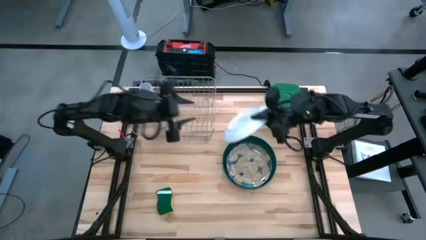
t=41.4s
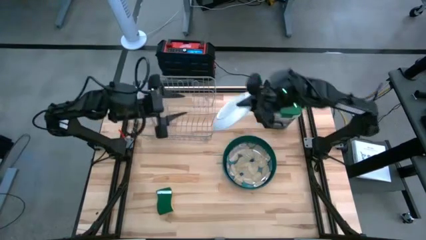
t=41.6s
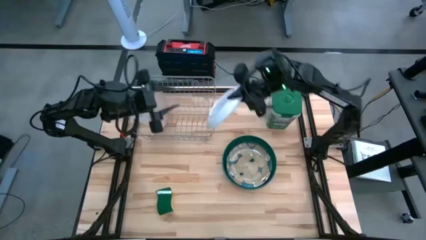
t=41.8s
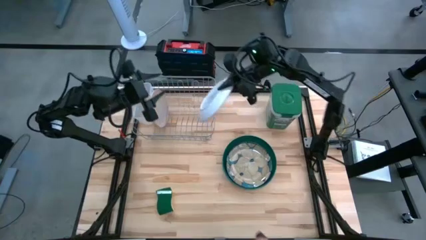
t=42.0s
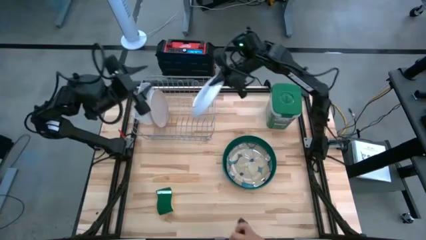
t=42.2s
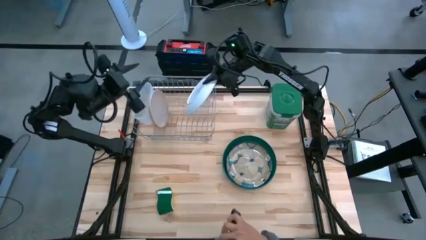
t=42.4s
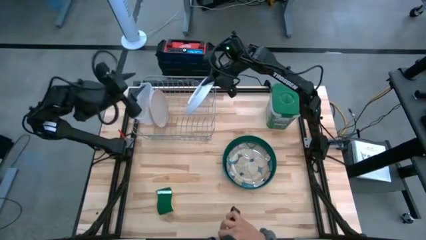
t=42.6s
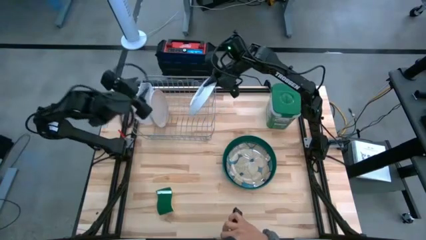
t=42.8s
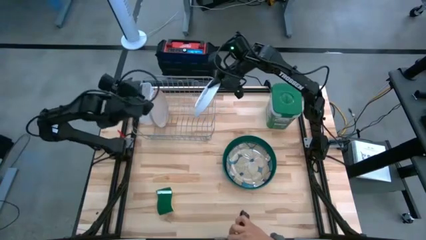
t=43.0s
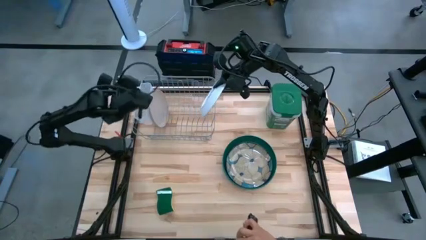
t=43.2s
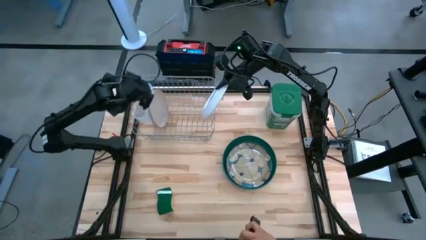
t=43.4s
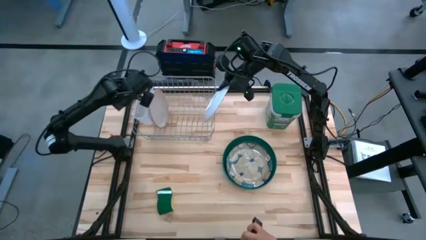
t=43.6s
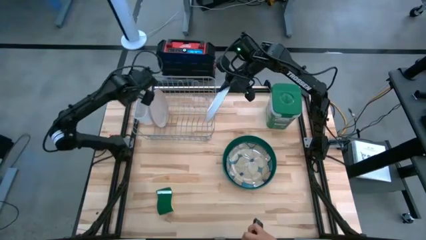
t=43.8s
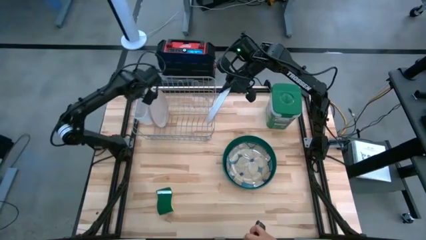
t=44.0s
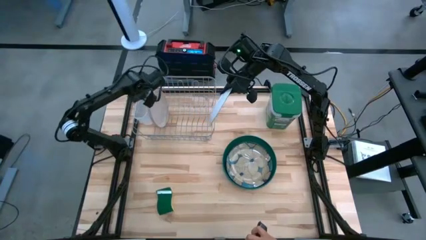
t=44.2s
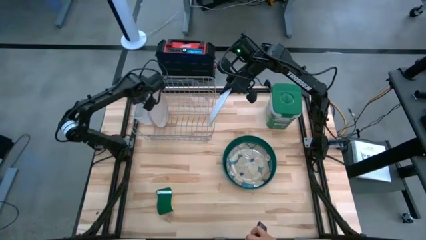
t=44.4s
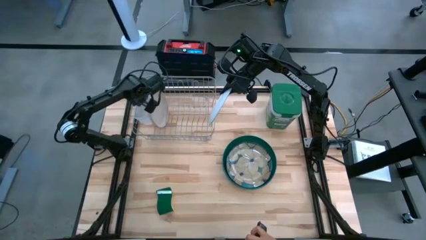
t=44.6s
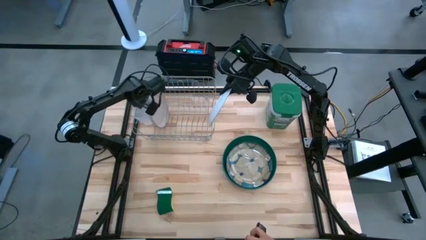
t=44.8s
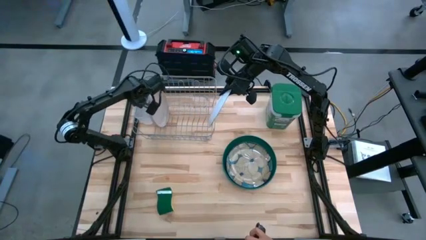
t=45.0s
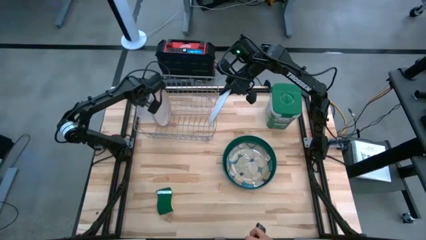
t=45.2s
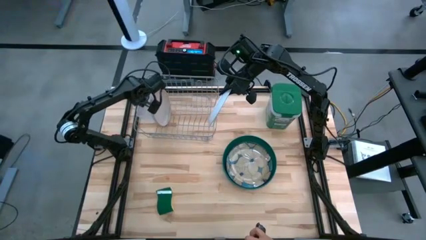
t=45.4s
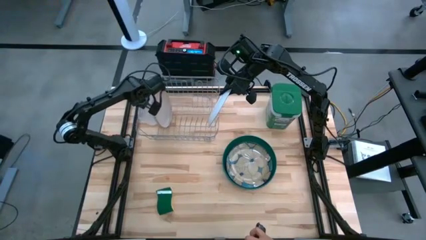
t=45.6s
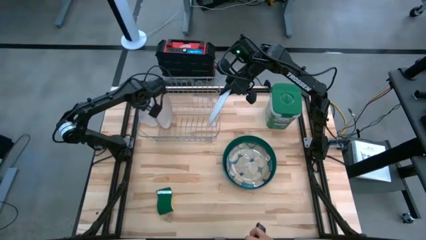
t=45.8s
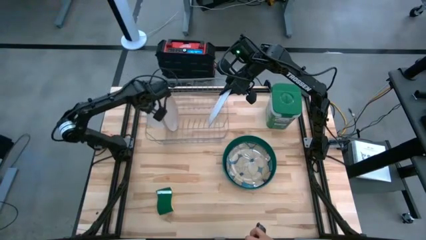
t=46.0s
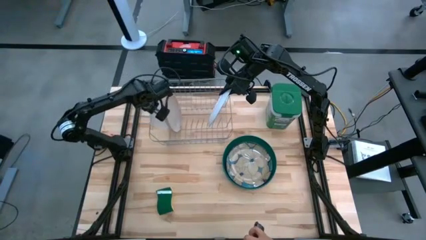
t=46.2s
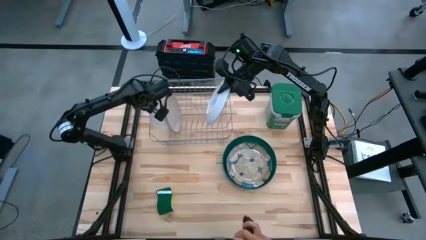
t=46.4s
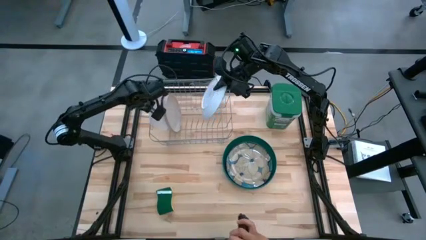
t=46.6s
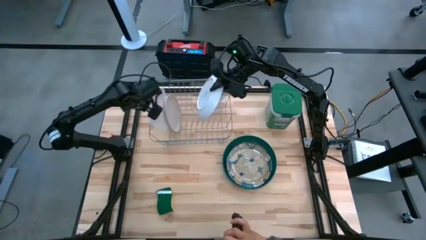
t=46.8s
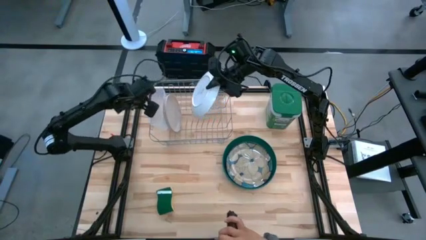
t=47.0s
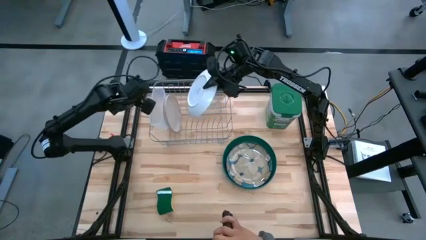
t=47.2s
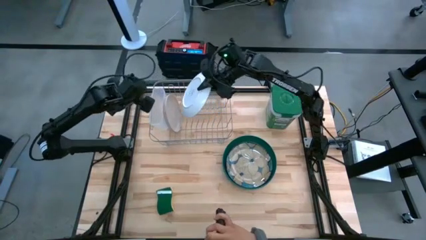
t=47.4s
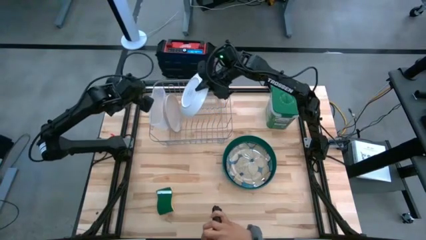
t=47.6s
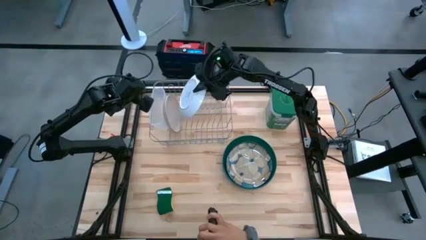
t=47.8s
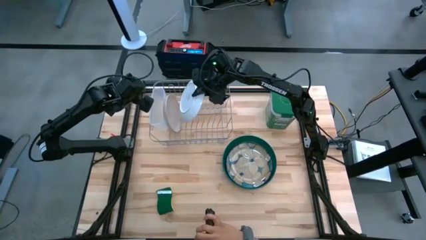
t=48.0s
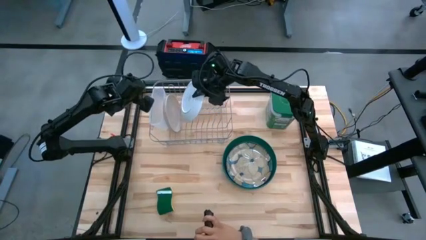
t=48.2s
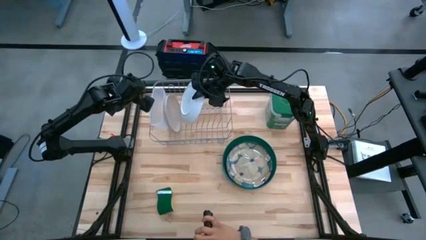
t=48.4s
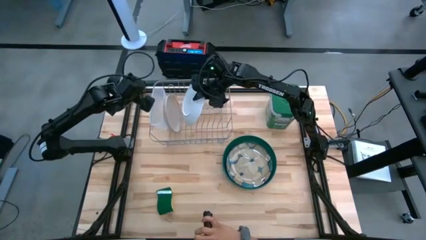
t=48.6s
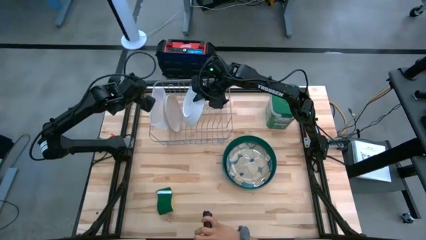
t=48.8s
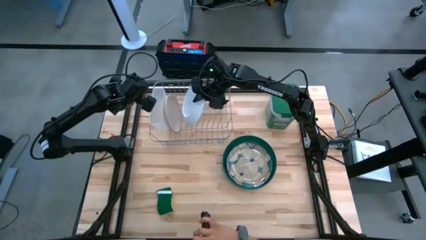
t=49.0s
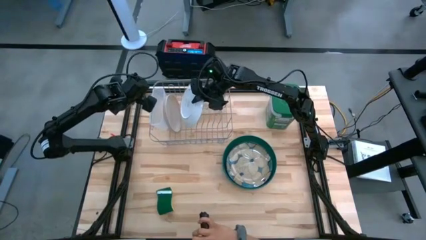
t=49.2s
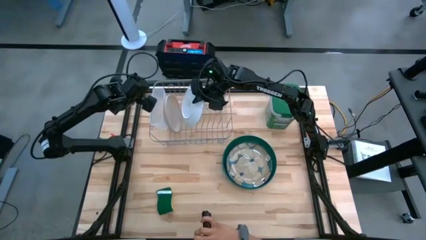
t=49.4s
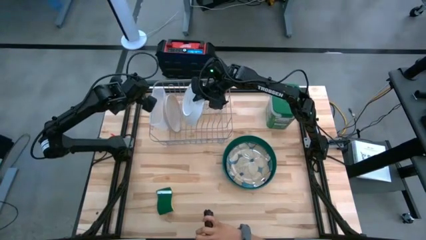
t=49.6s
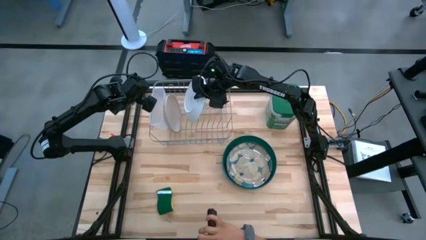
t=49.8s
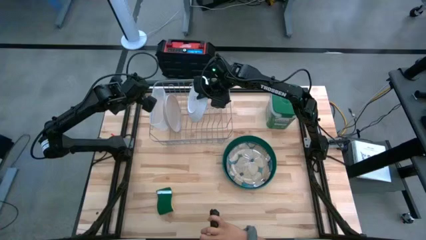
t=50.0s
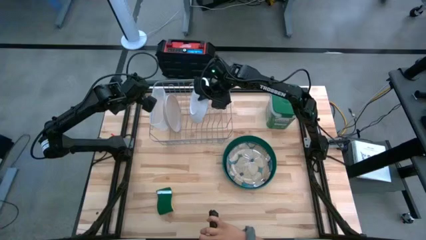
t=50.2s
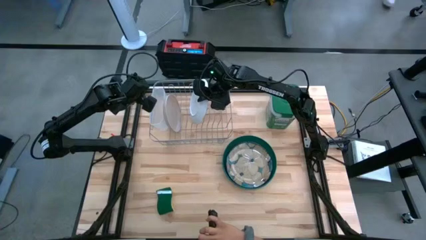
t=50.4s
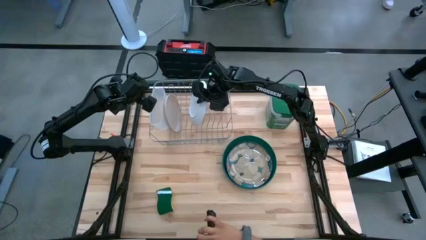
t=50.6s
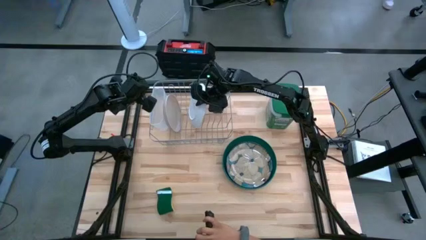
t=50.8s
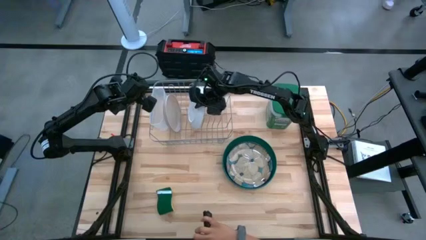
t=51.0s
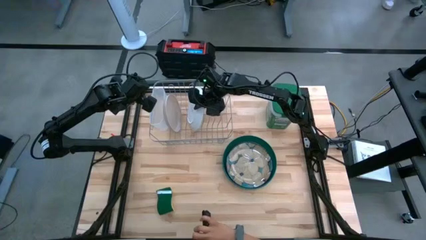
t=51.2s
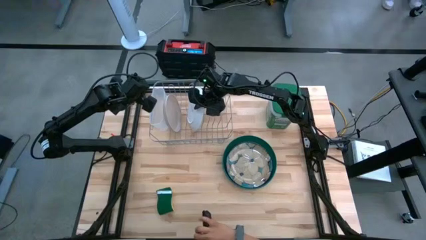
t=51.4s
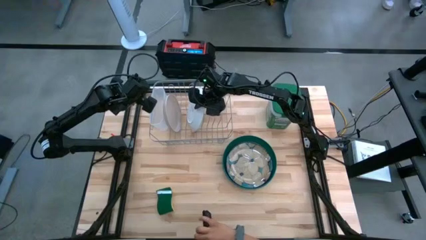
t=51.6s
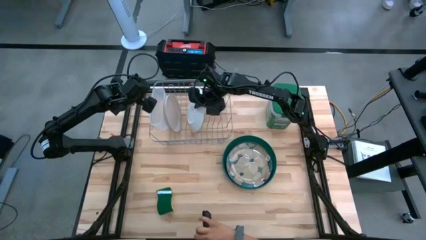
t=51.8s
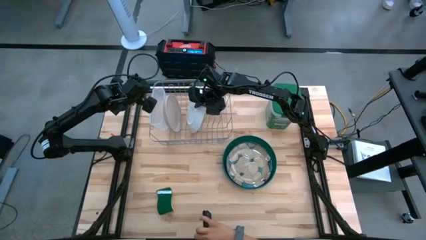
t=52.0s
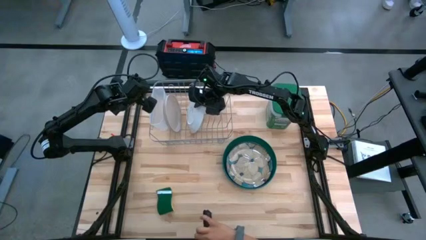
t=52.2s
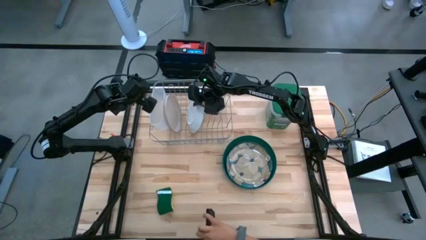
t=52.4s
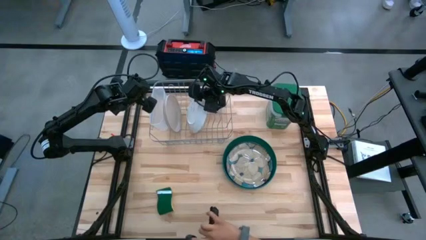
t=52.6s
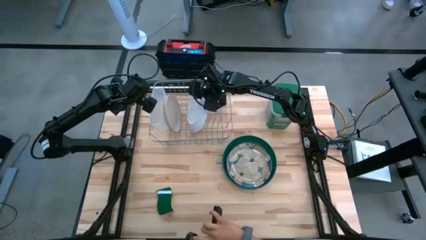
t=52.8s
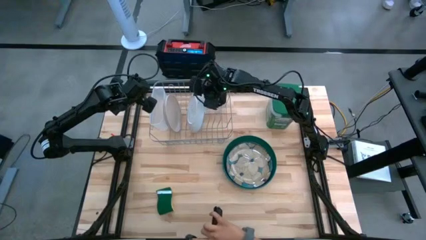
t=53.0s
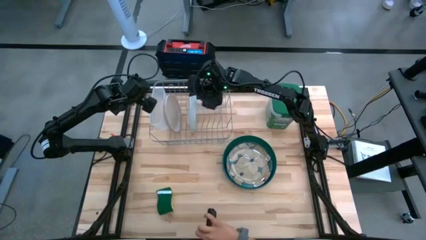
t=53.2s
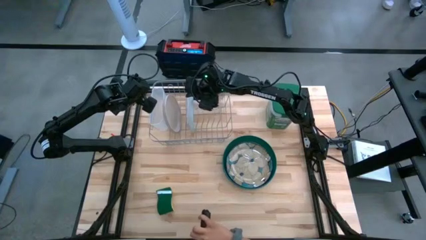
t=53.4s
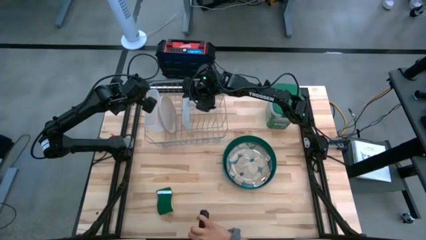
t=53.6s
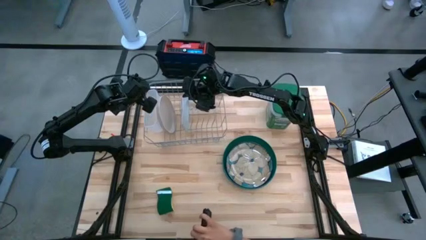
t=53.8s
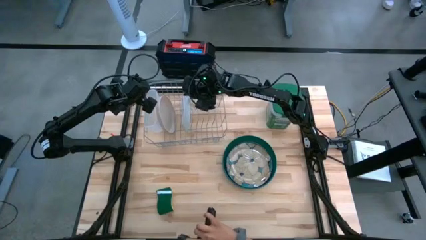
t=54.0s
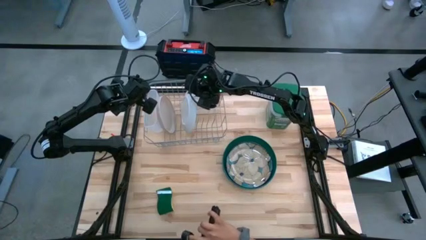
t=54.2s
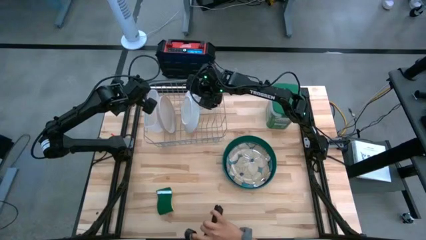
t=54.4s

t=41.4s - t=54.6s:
Task: Sort dishes
Put the blue patterned plate on the dish rack

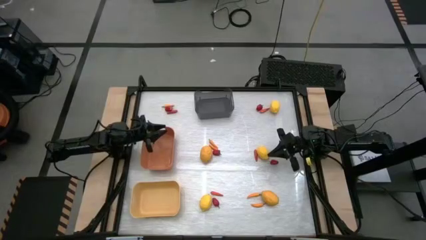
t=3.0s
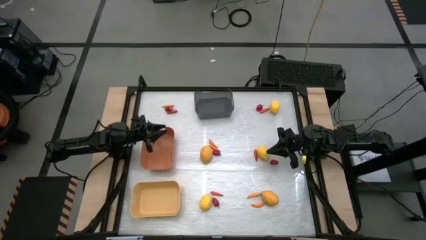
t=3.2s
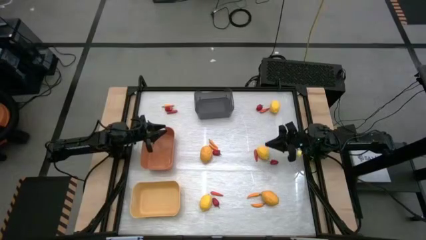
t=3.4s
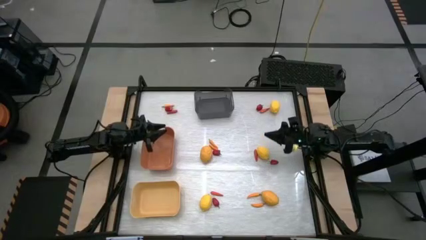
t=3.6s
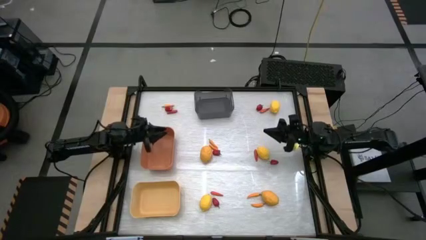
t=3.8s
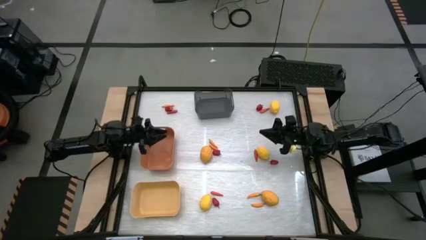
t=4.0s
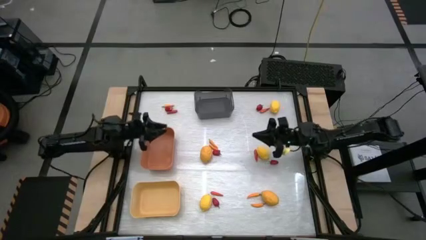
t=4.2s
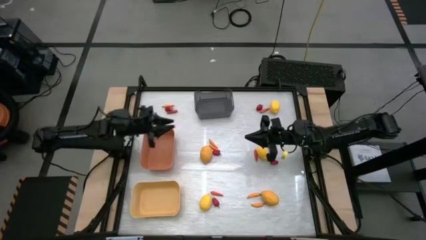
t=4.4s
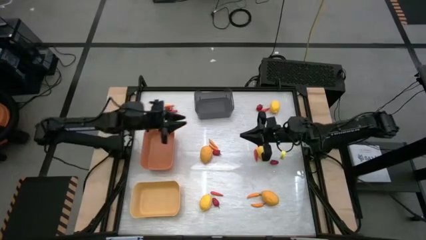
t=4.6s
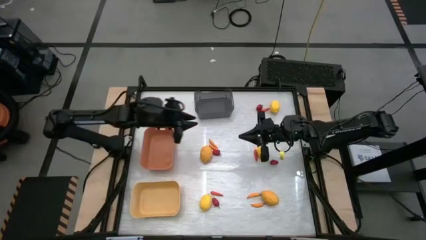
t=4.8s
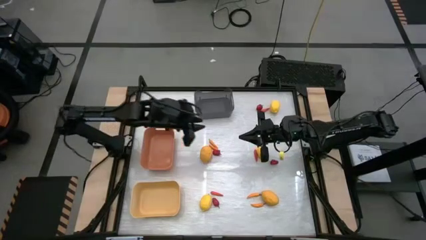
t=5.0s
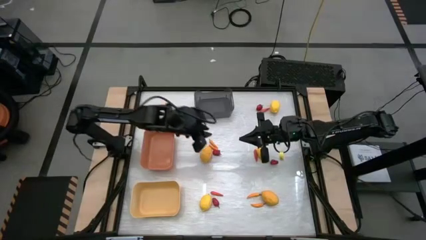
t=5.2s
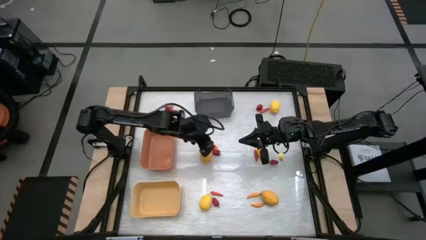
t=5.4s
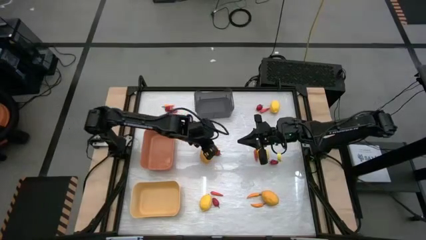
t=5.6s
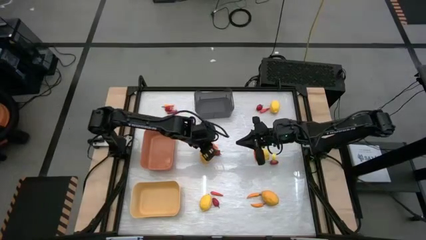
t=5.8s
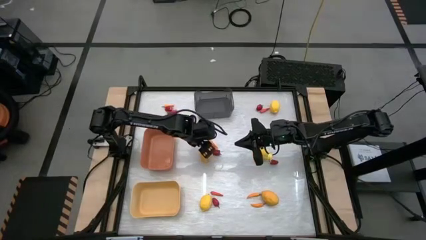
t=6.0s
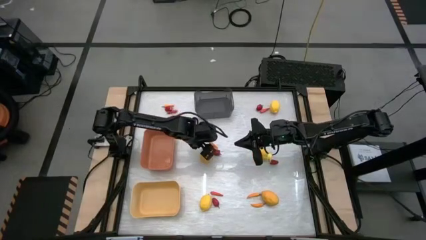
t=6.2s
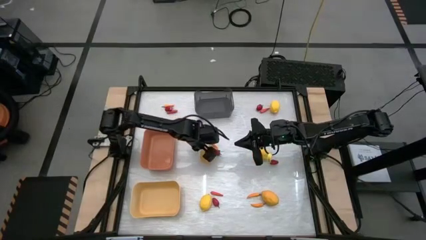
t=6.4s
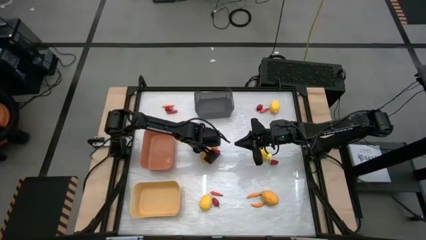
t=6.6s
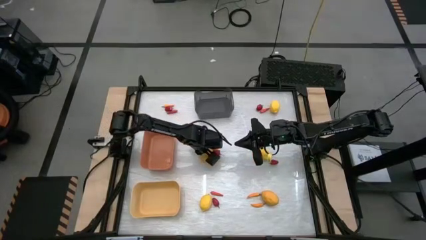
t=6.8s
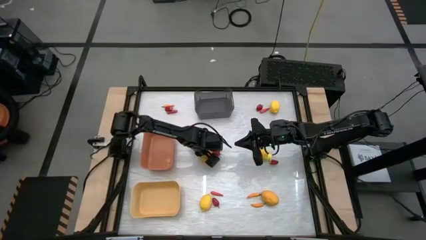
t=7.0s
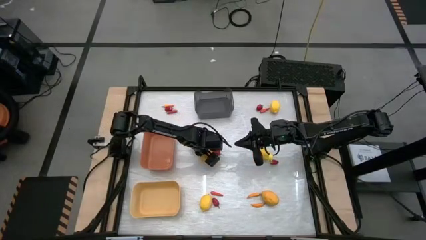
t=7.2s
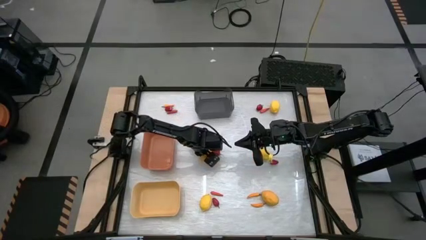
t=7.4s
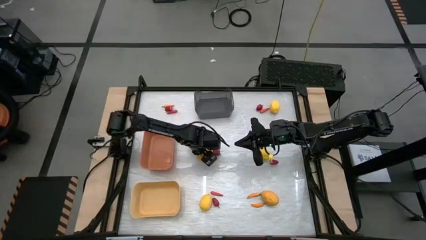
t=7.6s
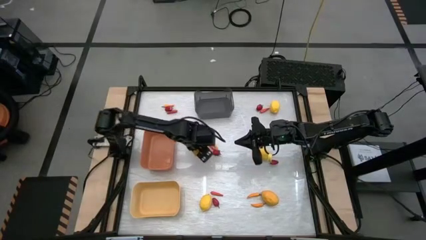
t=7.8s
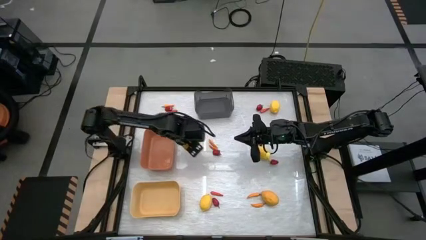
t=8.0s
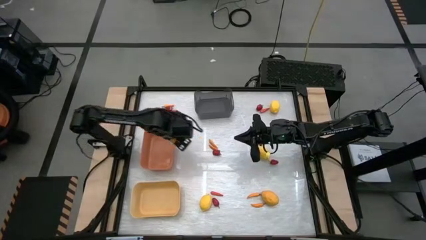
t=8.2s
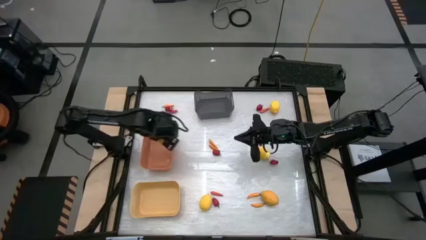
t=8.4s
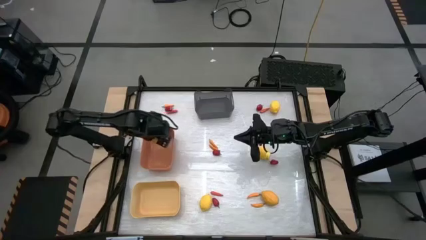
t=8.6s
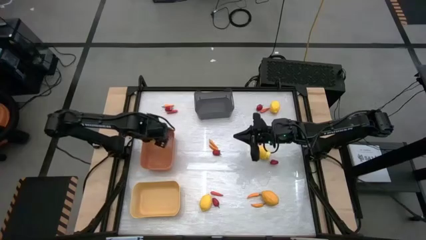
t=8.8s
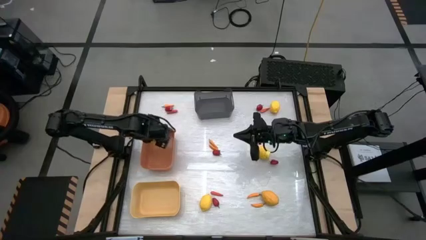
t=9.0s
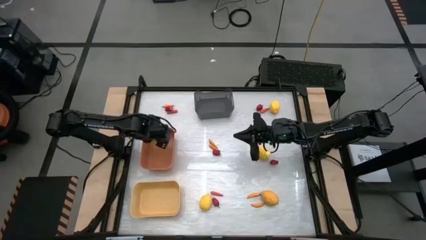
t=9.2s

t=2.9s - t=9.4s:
Task: Sort produce into baskets
Put the yellow lemon into the orange bin
